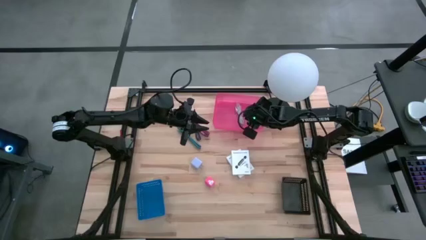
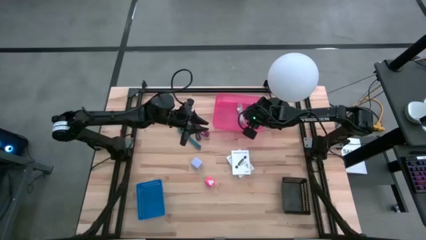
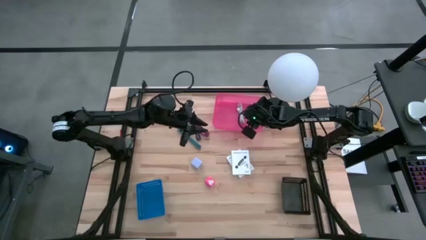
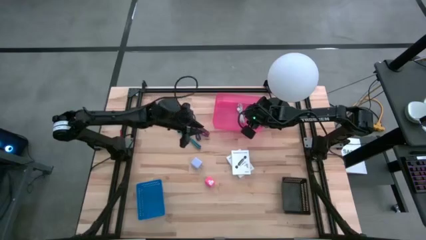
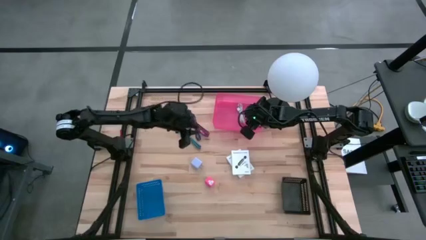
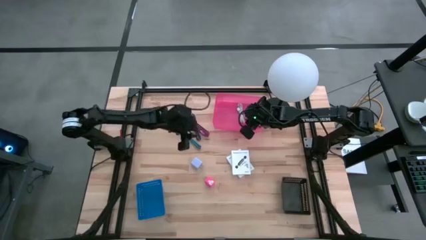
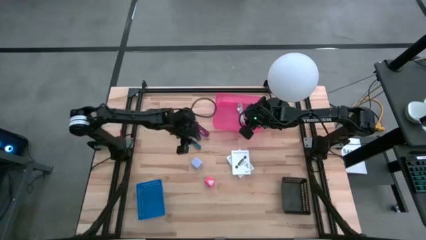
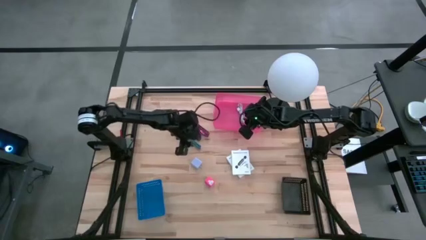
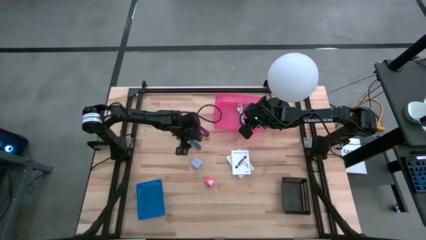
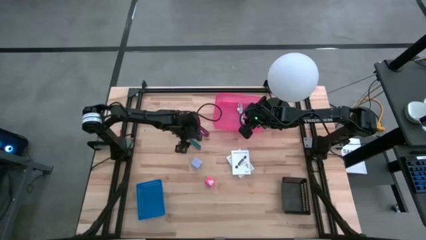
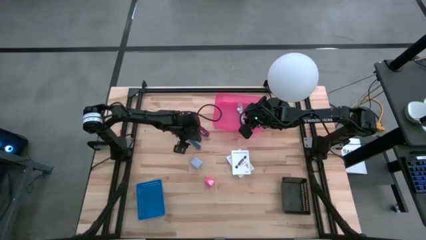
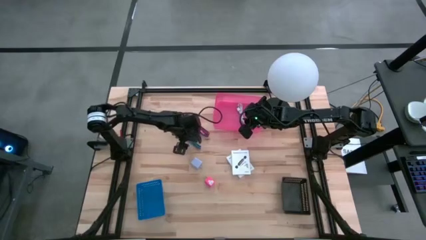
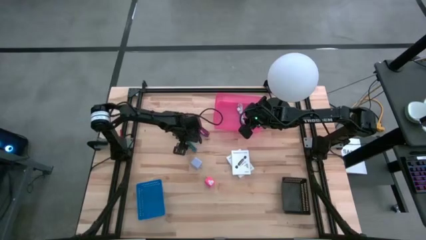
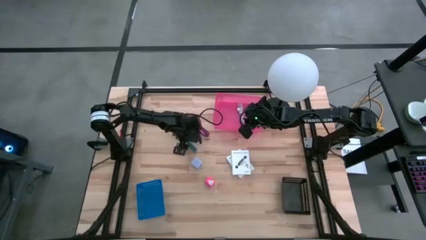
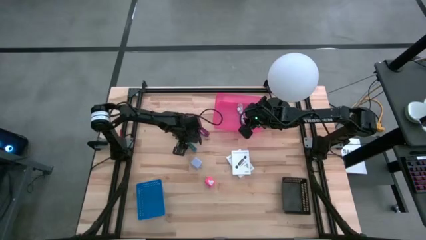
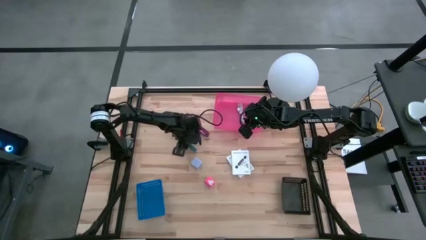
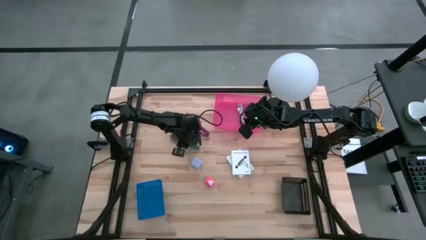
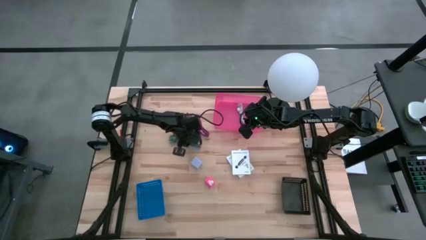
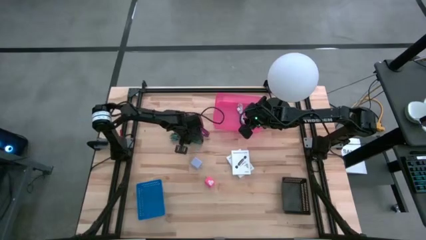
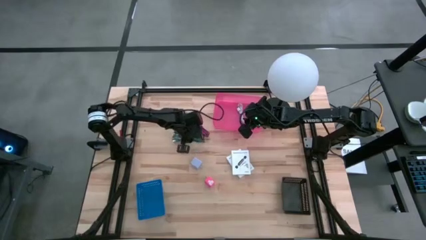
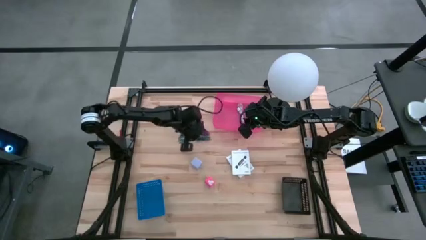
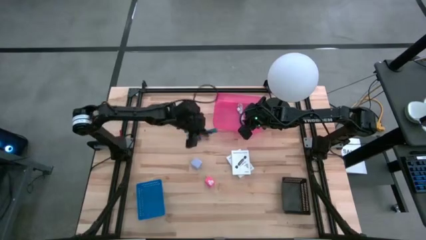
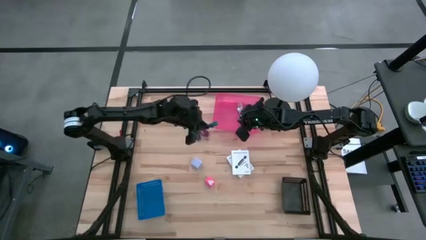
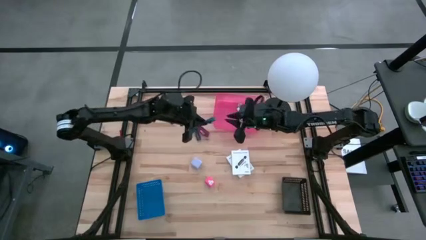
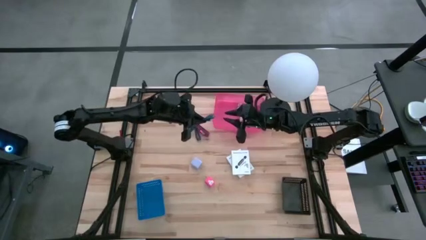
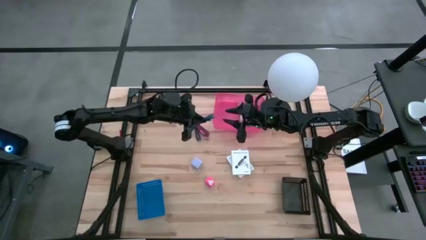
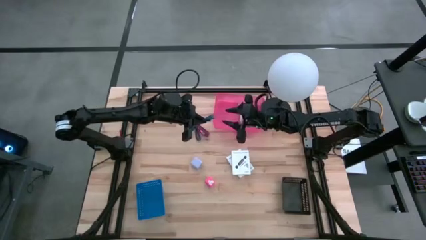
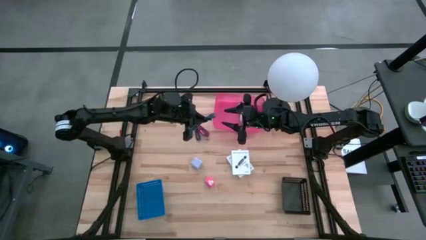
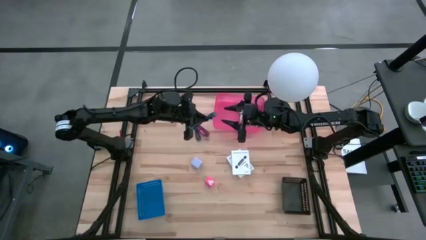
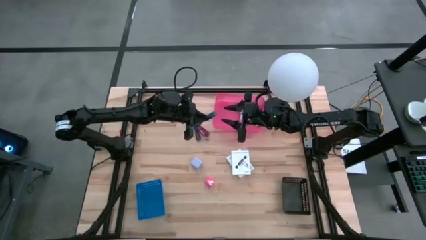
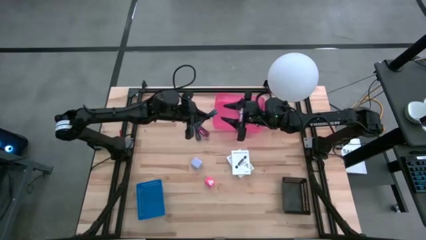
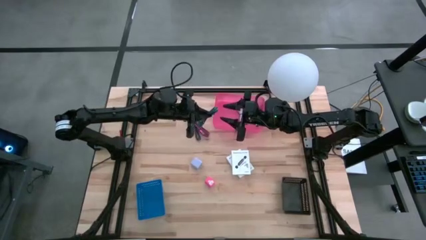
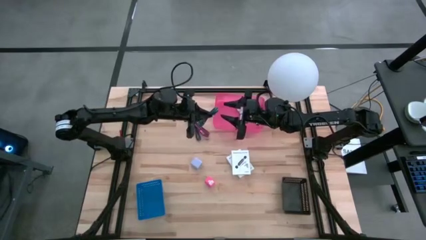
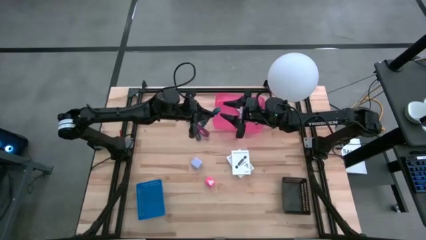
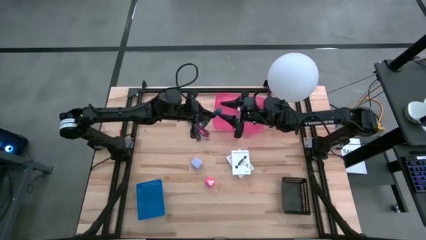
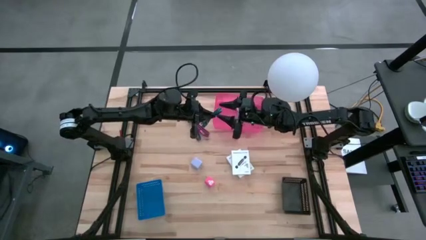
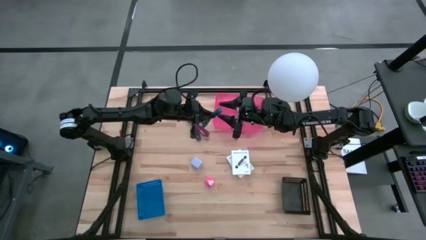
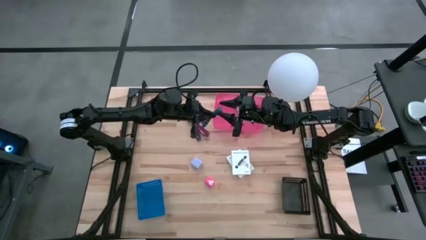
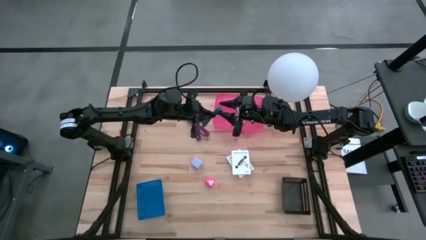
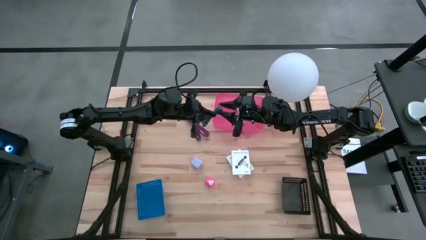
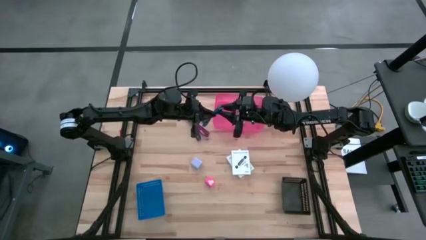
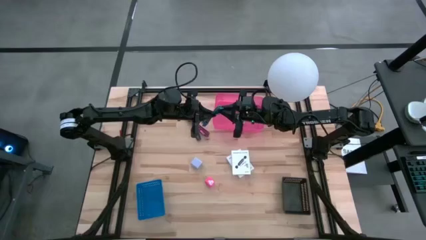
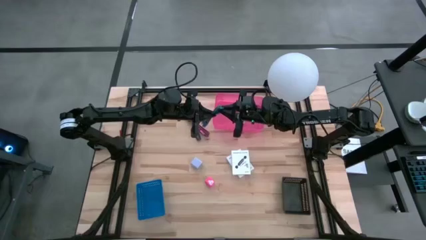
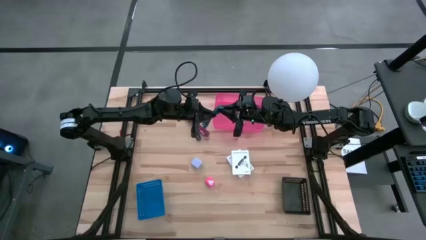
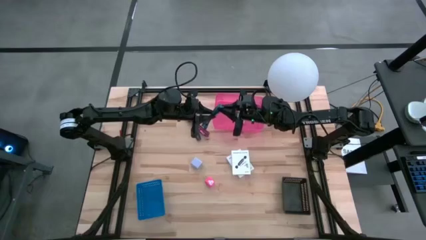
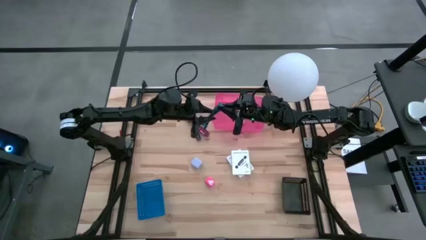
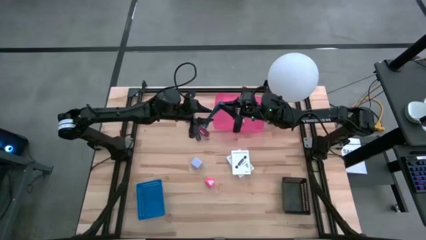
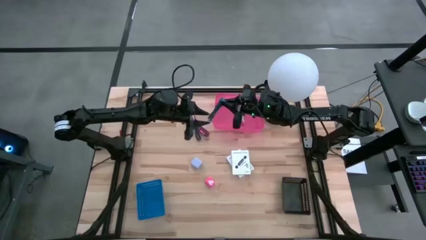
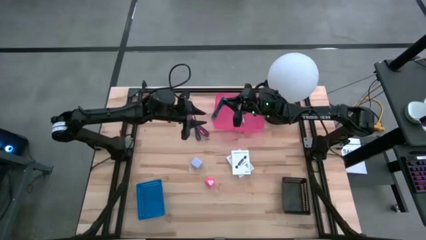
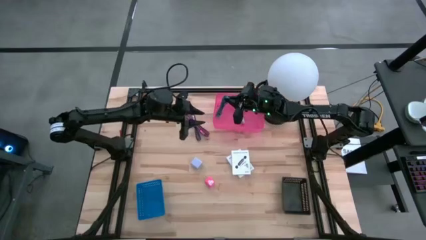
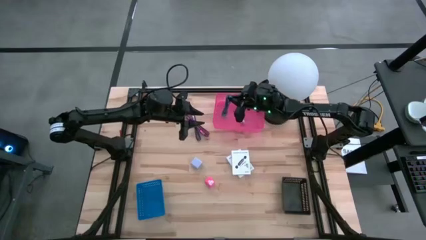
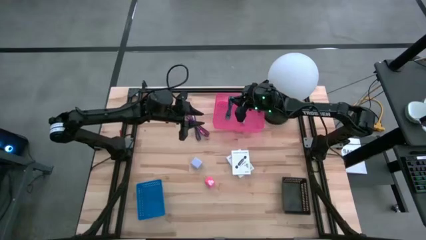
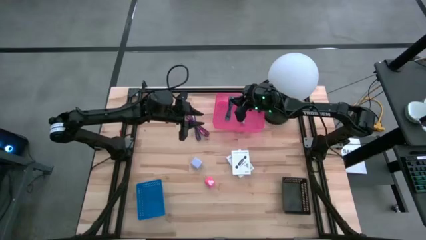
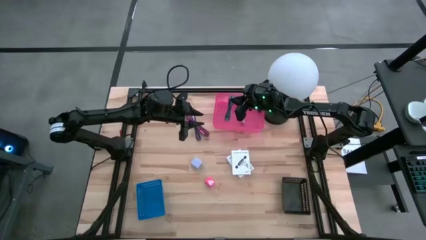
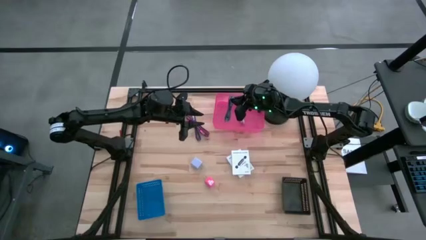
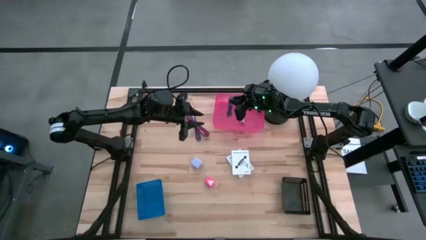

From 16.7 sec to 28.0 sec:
Task: Pick and place items into bin
Put the light blue charger cable into the pink bin
